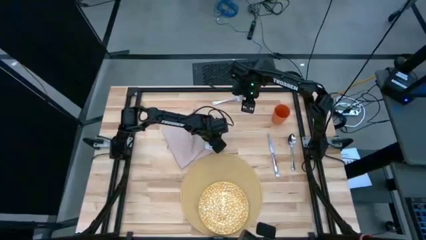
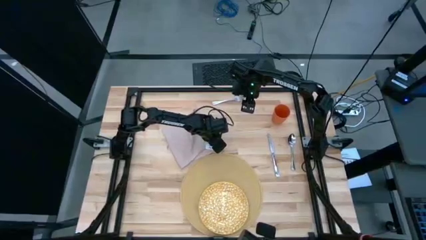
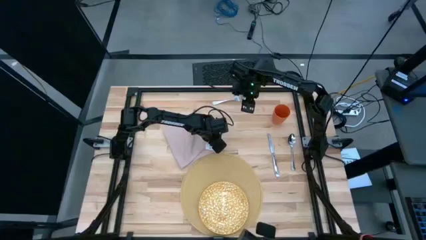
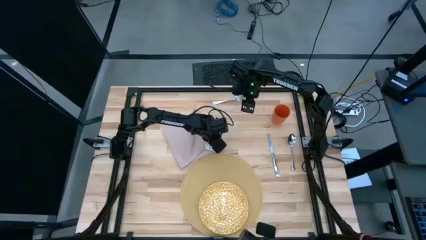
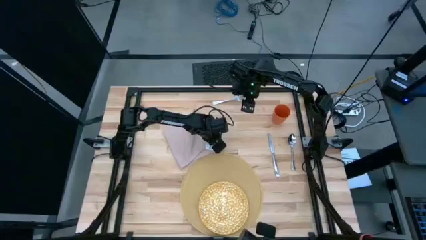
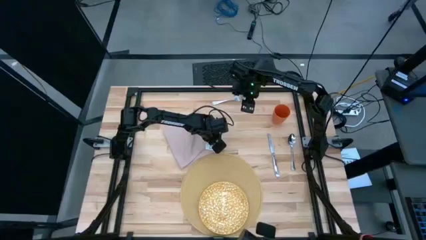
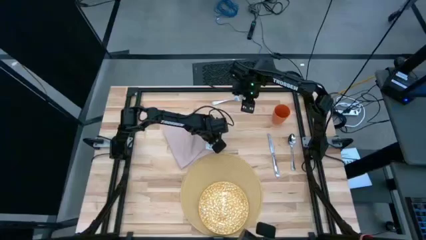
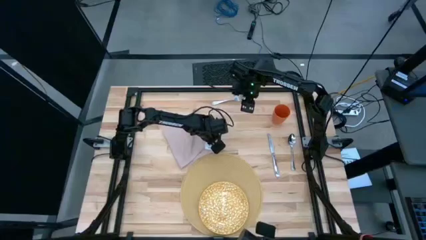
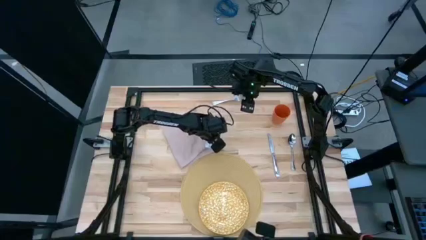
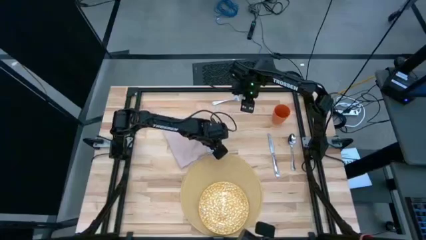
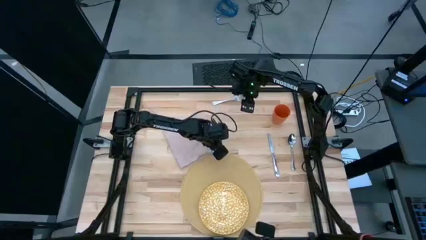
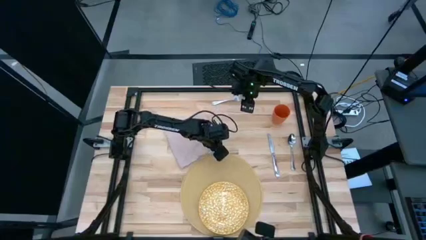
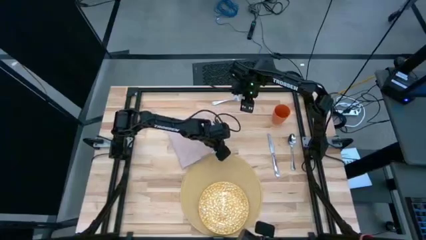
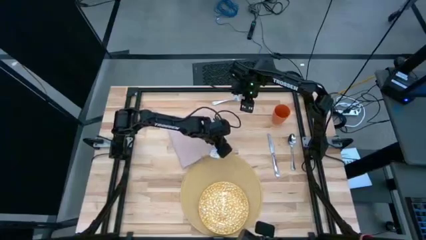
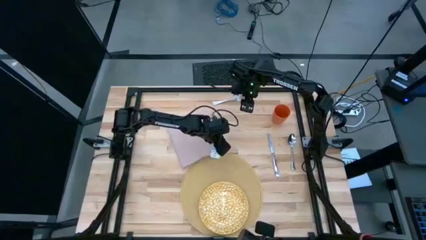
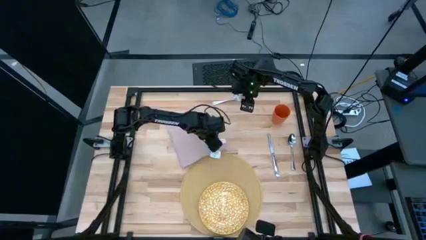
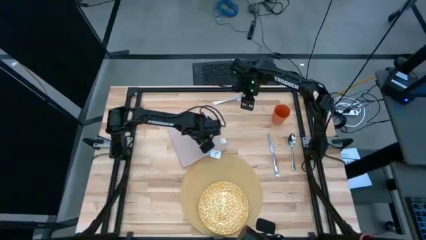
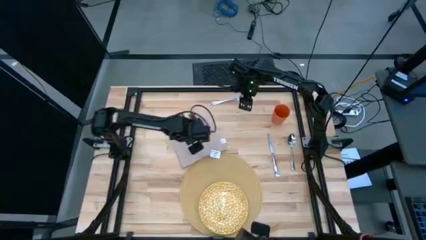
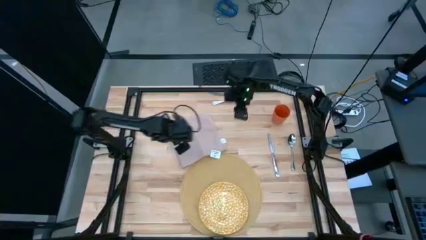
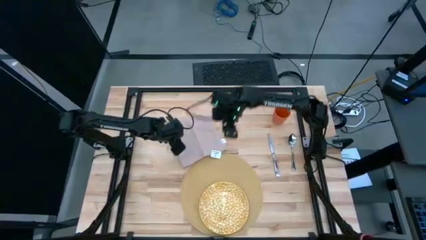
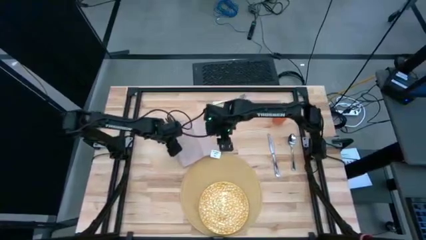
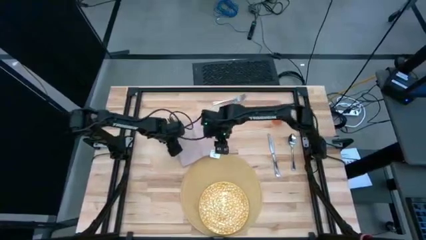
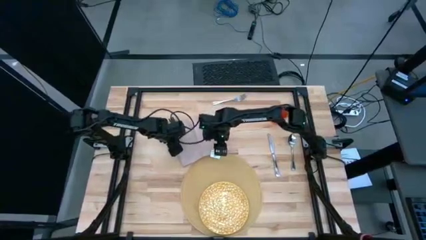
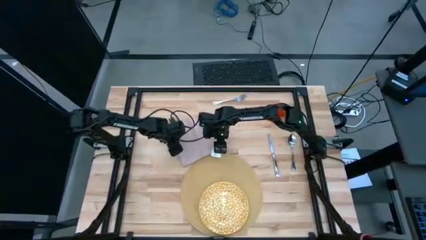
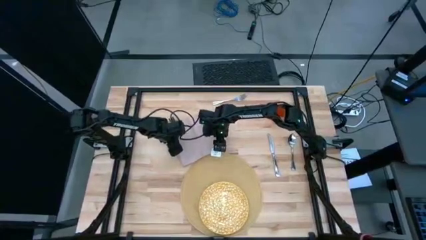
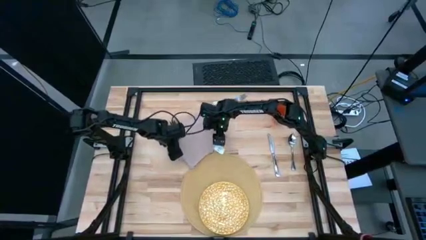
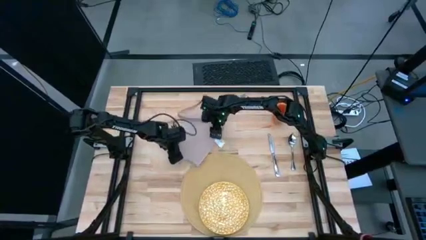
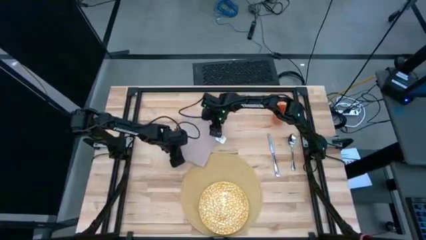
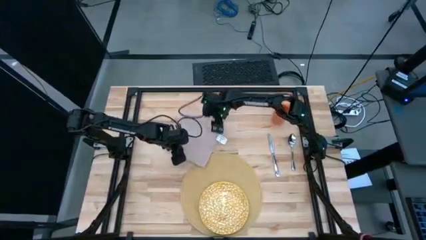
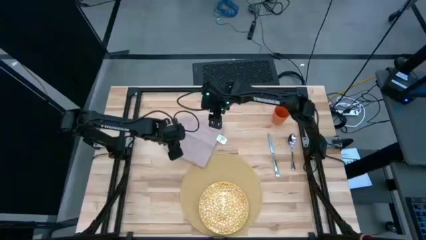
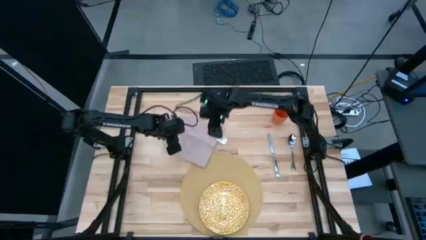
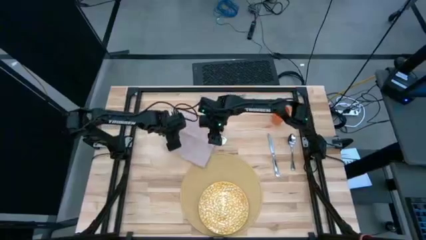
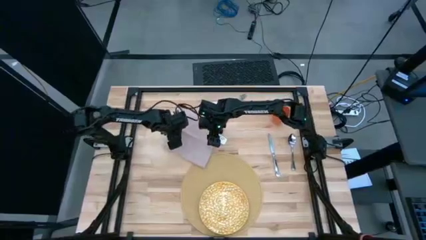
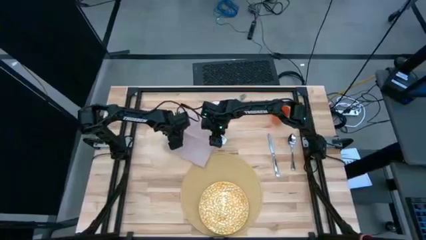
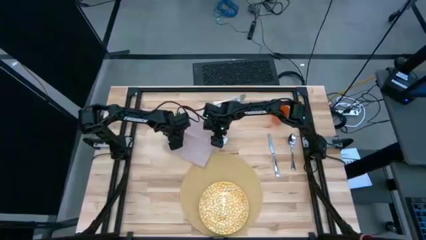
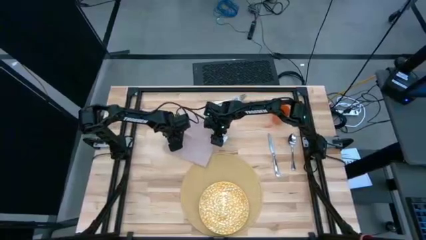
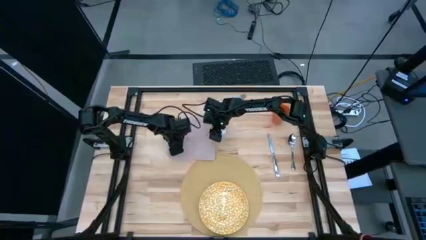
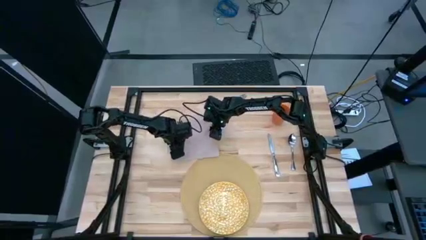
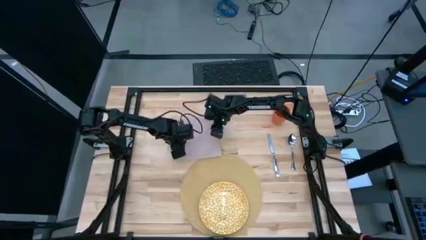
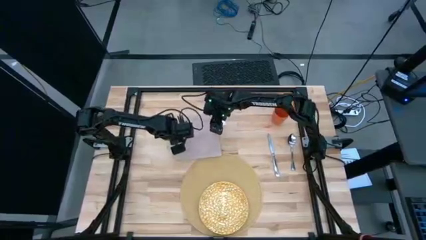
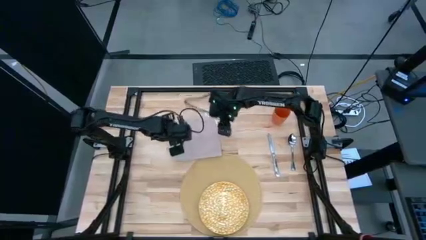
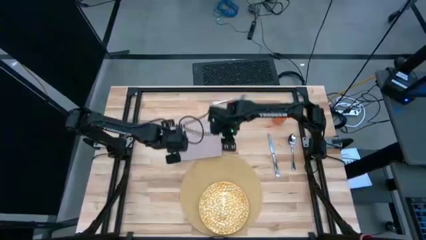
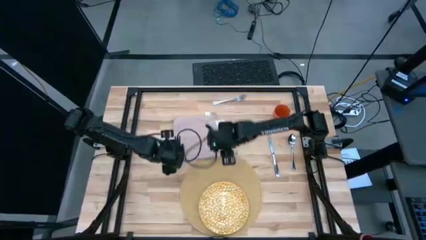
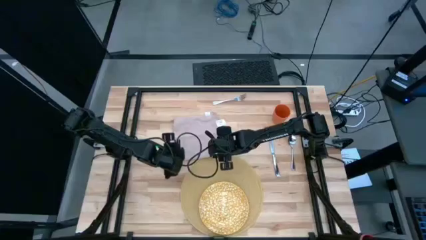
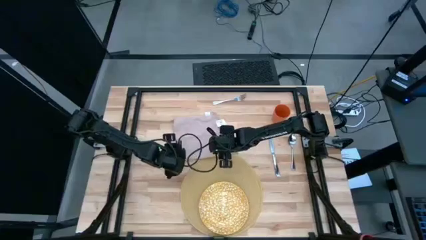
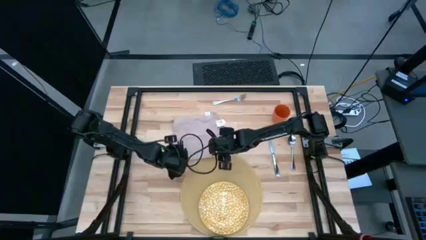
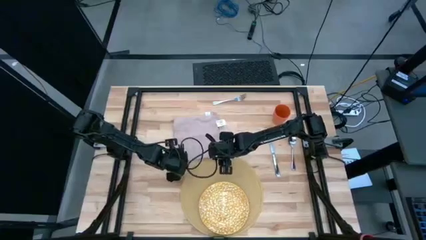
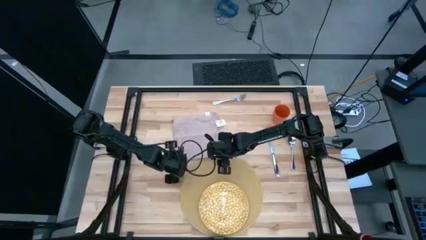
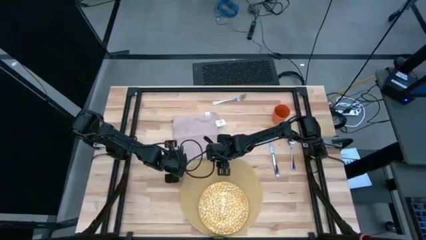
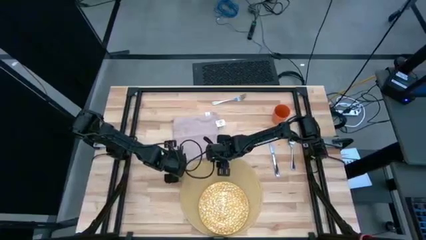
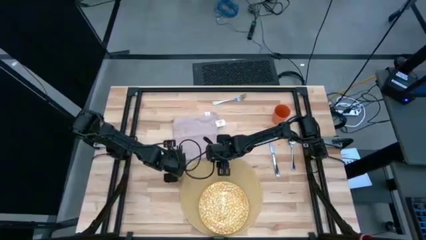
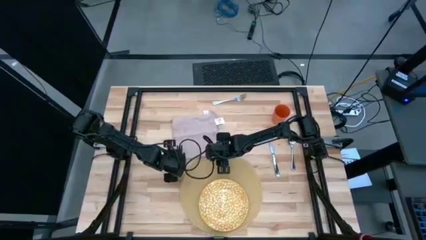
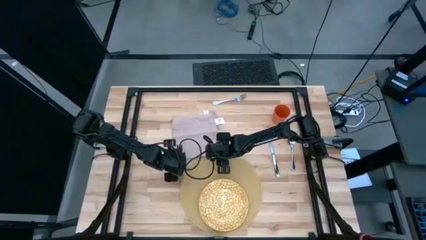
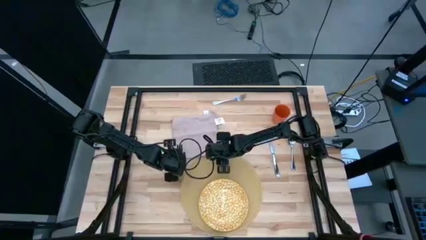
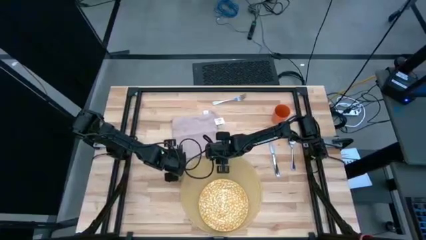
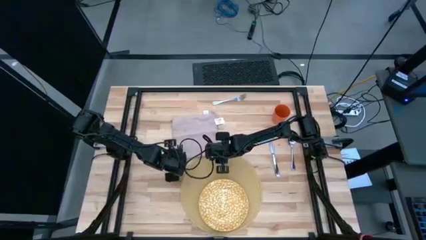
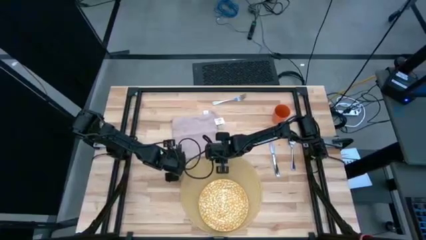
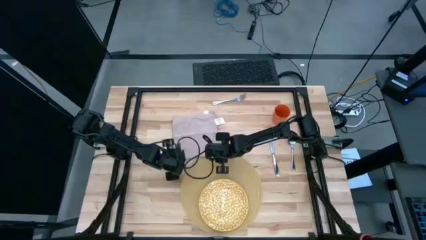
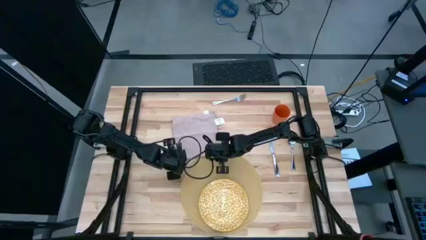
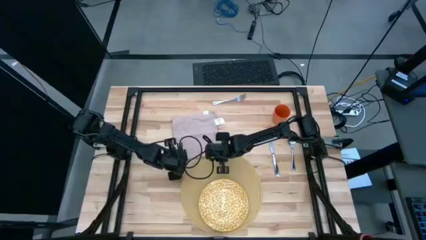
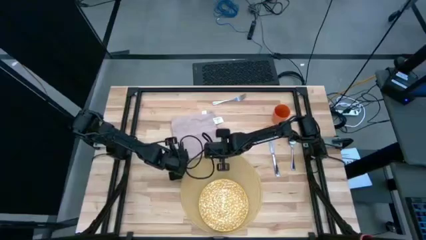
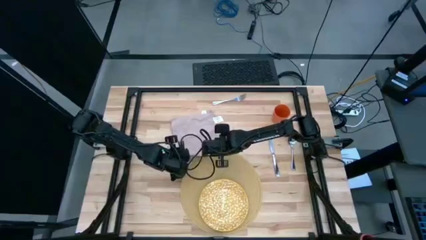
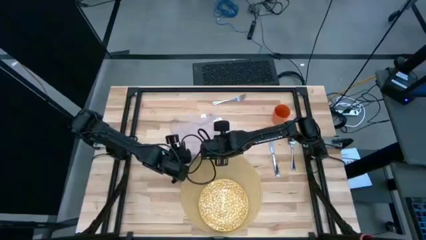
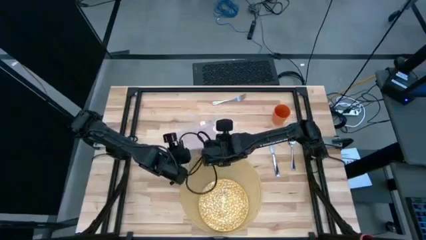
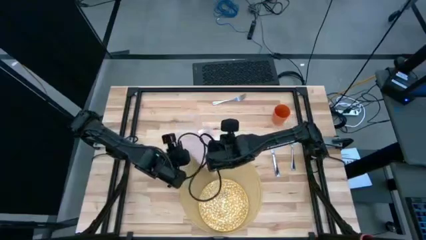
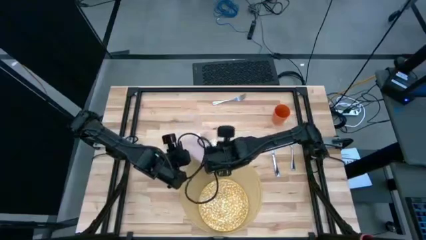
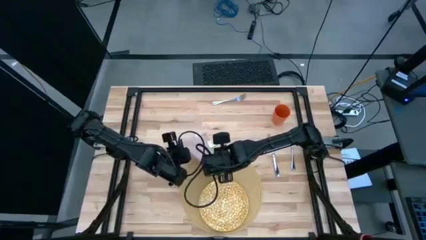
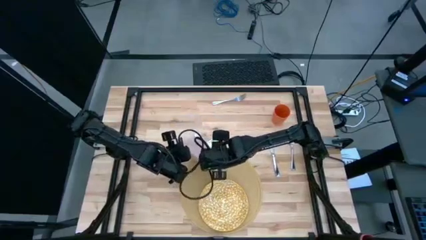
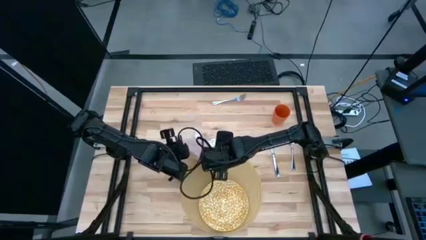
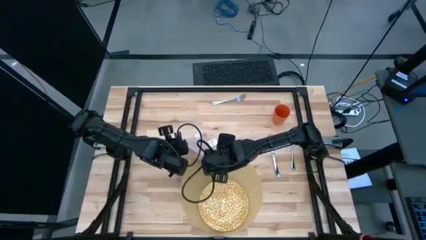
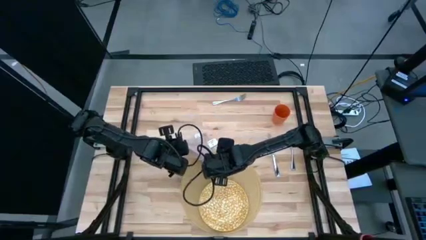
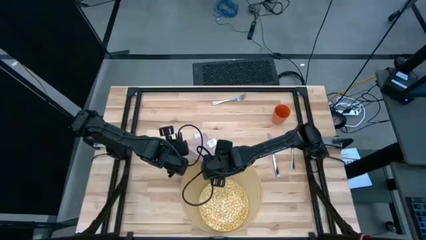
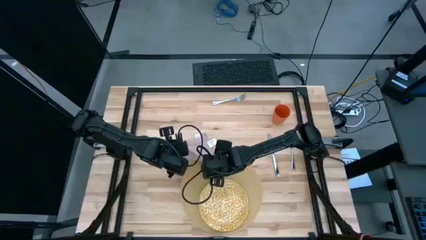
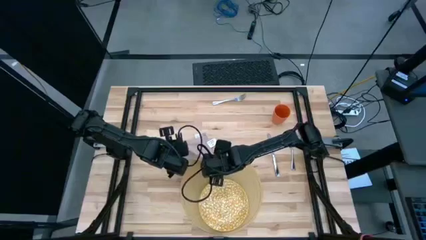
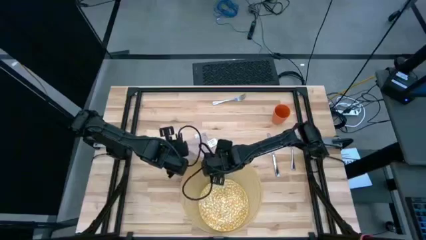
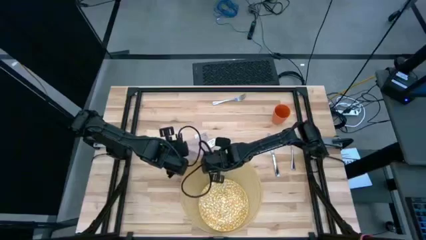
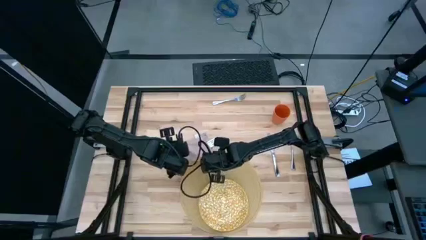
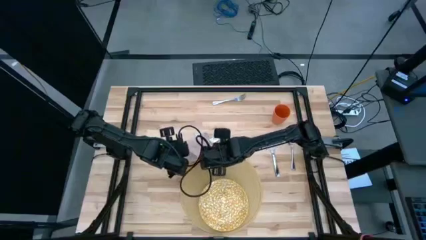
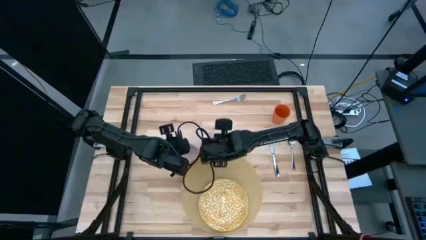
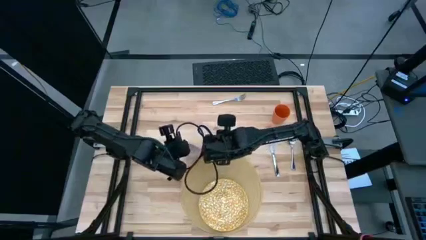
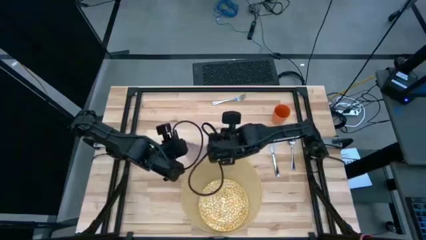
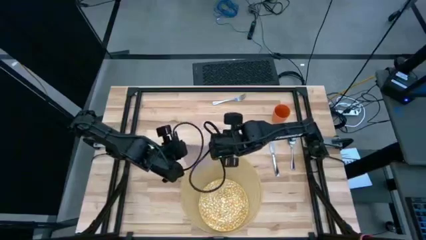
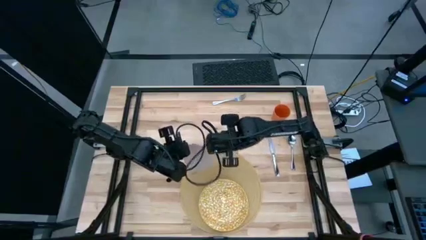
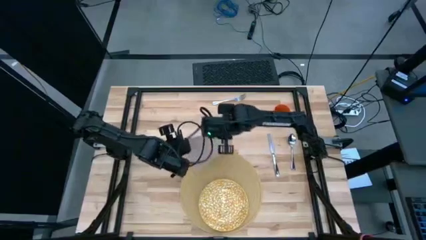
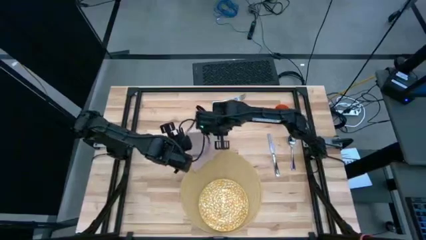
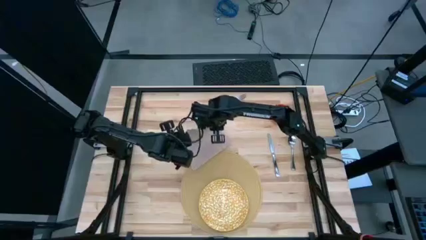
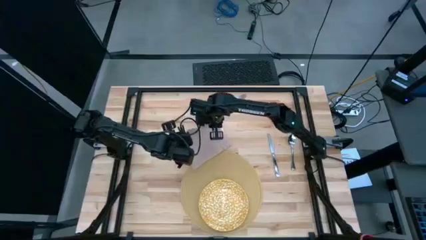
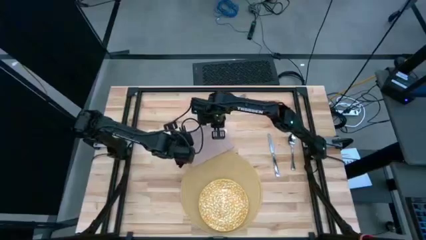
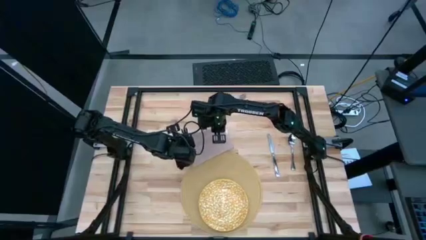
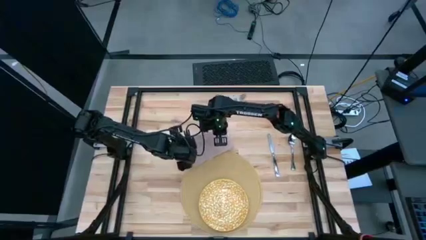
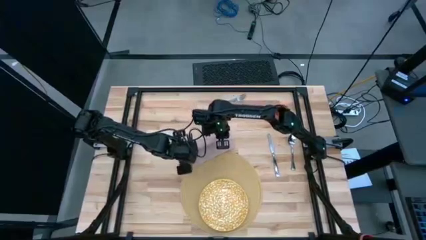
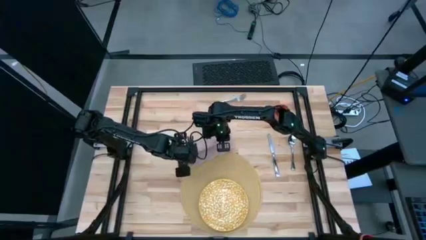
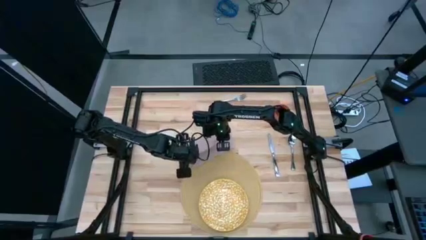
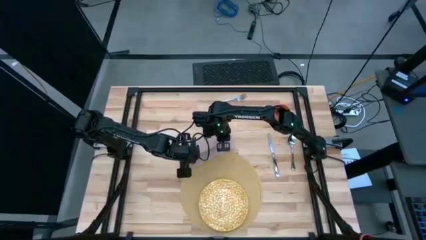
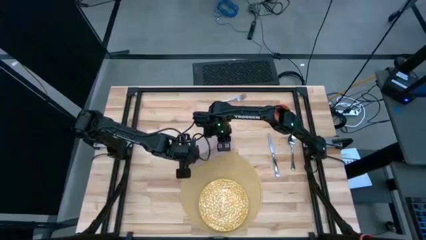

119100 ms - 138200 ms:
Task: Set table place
Fold the brown table napkin
